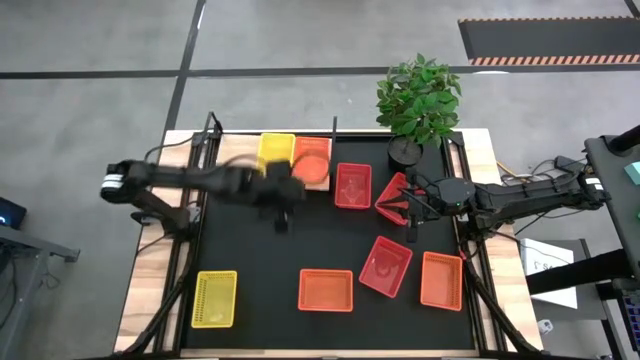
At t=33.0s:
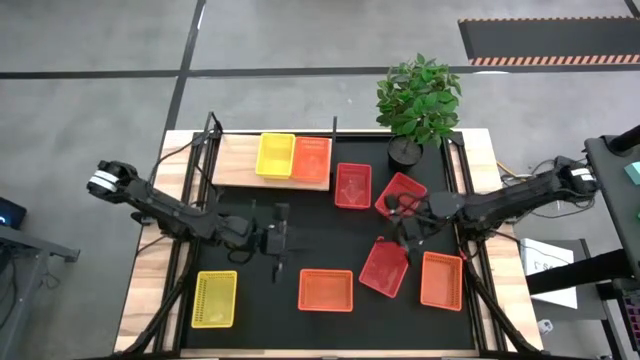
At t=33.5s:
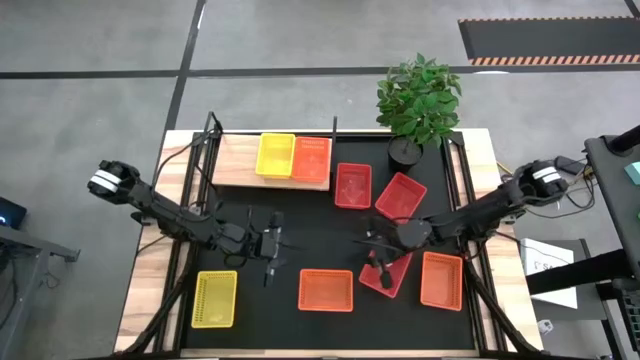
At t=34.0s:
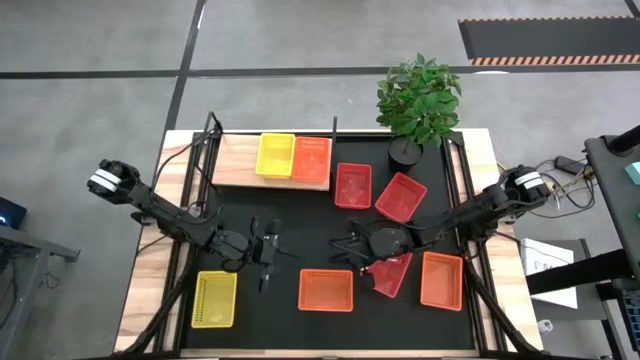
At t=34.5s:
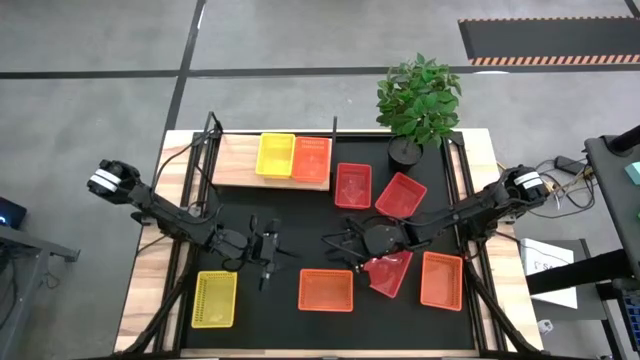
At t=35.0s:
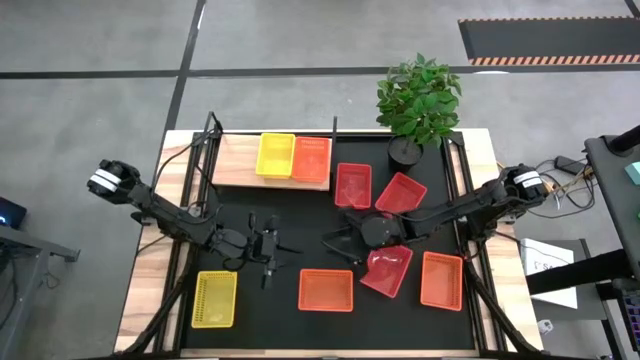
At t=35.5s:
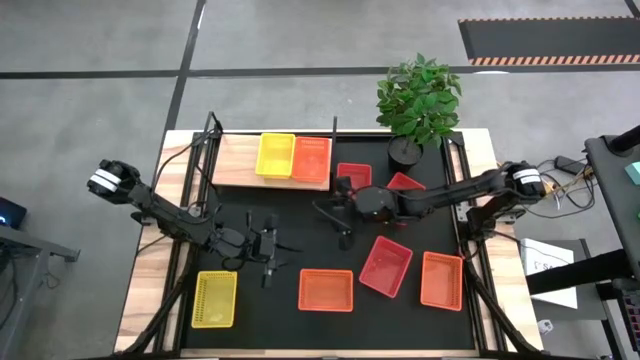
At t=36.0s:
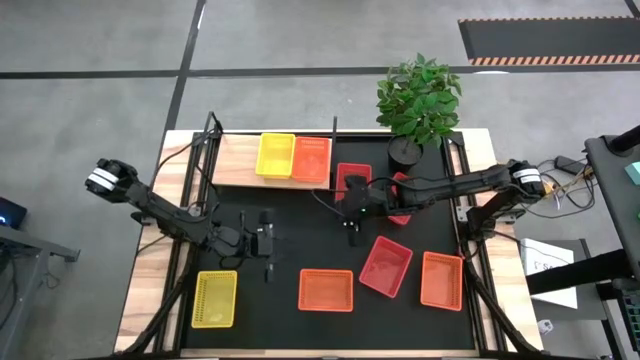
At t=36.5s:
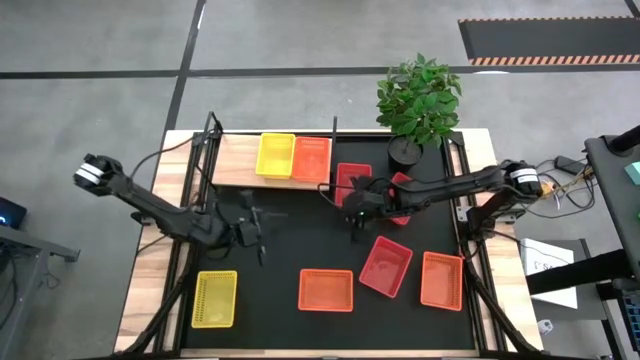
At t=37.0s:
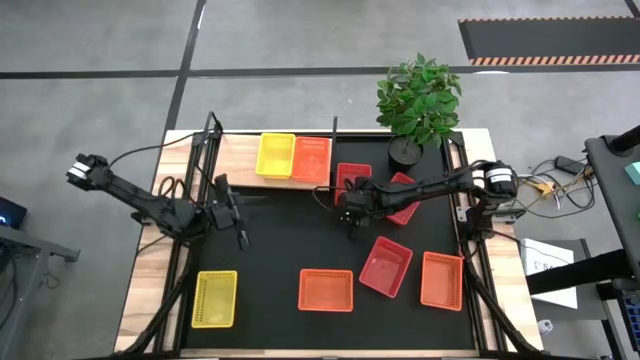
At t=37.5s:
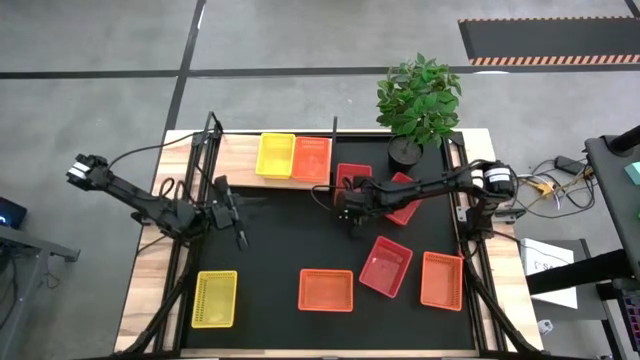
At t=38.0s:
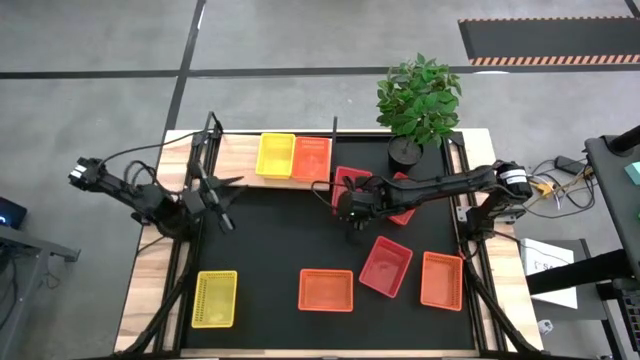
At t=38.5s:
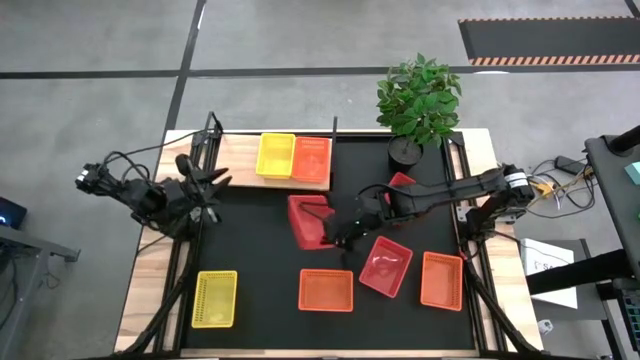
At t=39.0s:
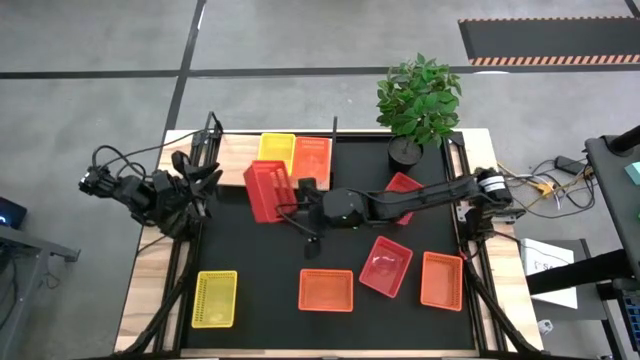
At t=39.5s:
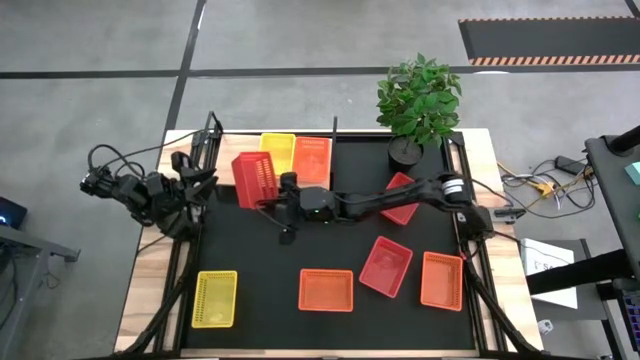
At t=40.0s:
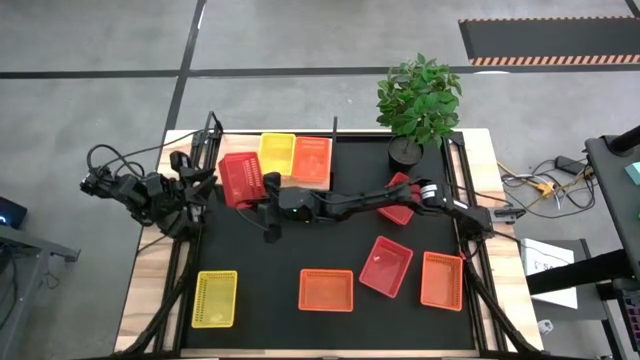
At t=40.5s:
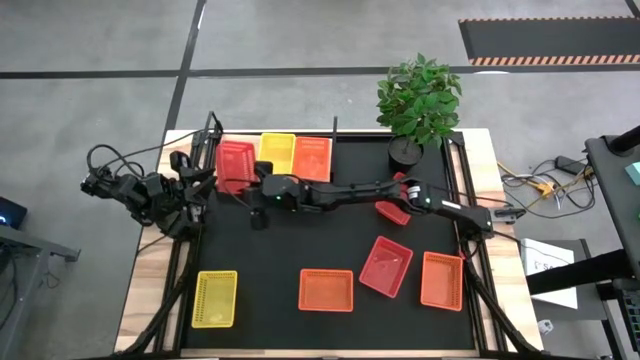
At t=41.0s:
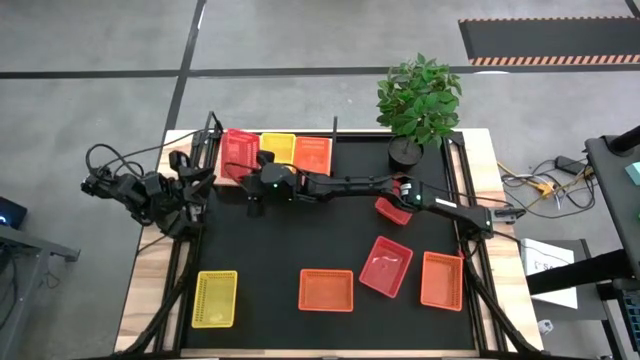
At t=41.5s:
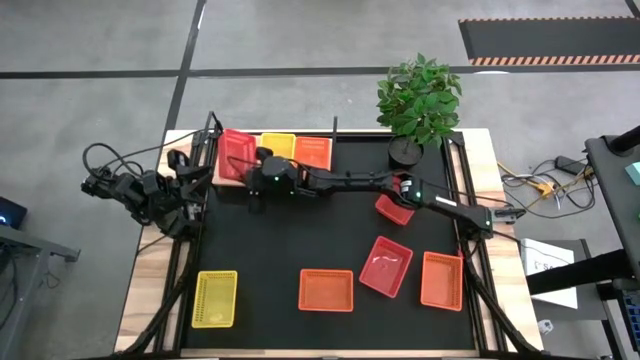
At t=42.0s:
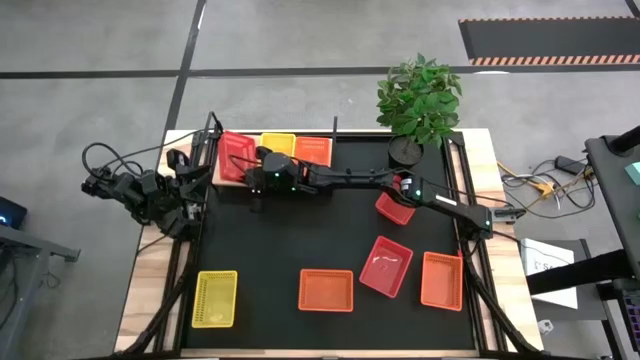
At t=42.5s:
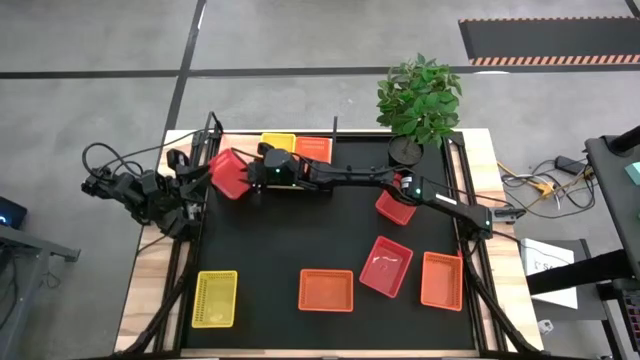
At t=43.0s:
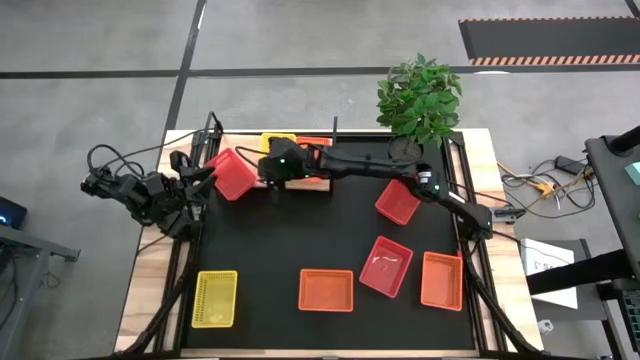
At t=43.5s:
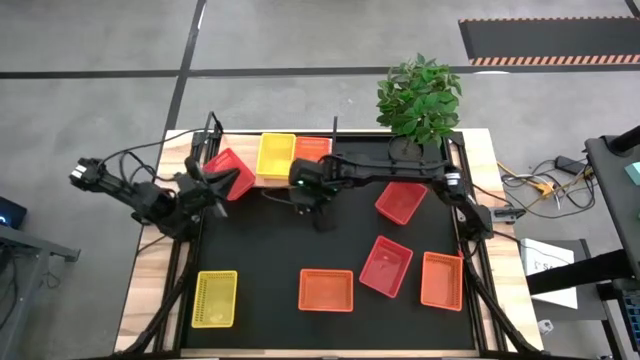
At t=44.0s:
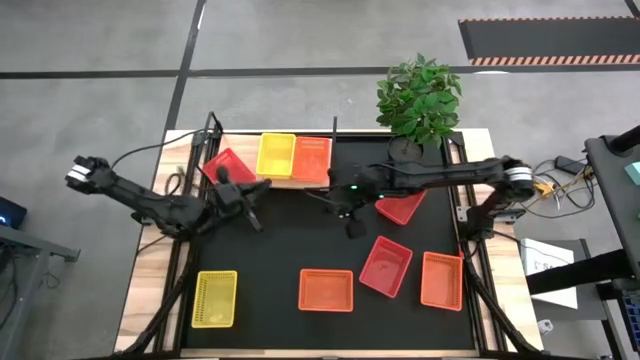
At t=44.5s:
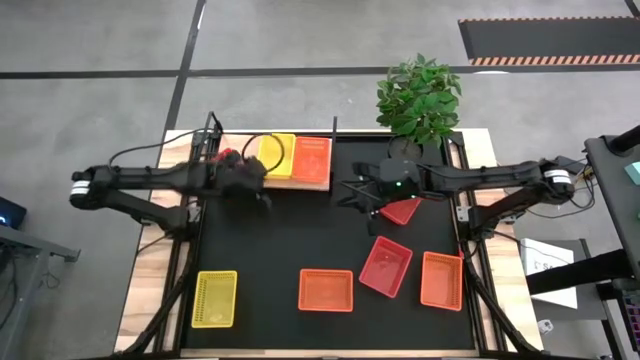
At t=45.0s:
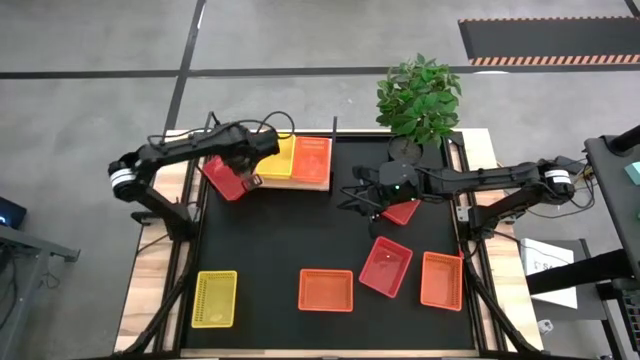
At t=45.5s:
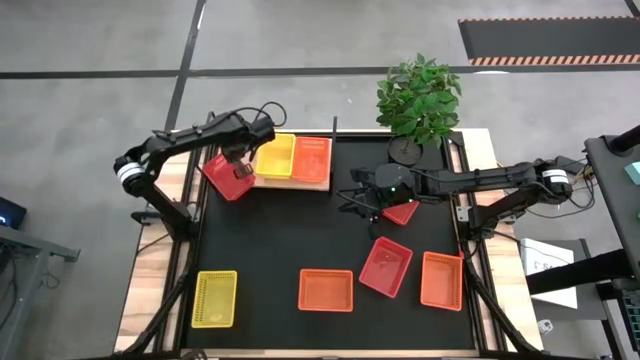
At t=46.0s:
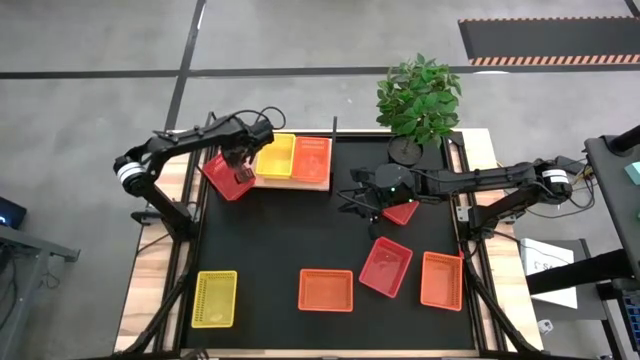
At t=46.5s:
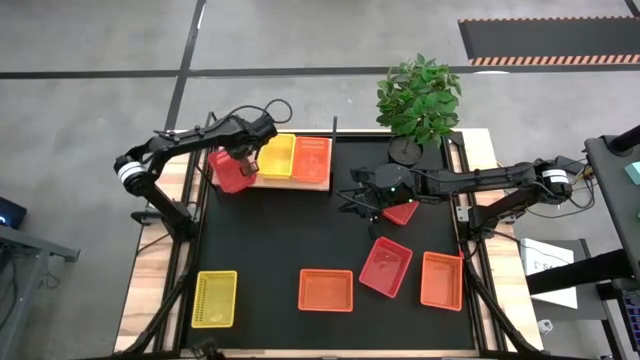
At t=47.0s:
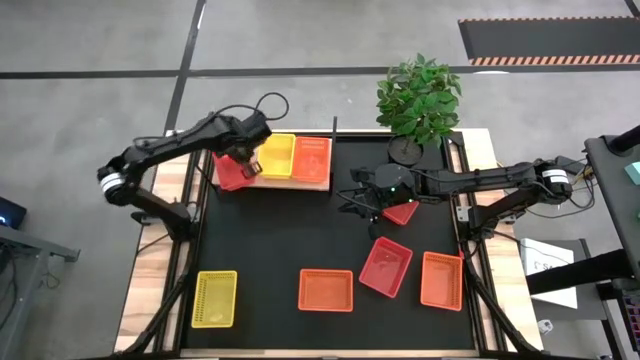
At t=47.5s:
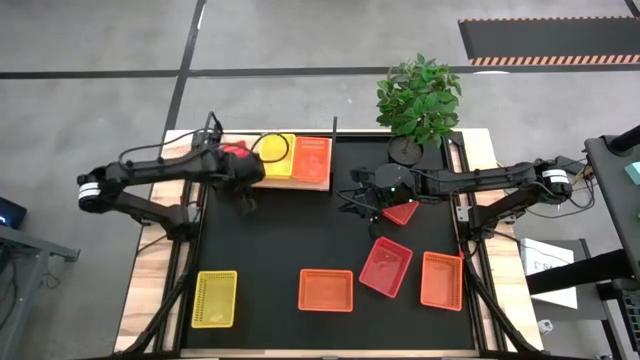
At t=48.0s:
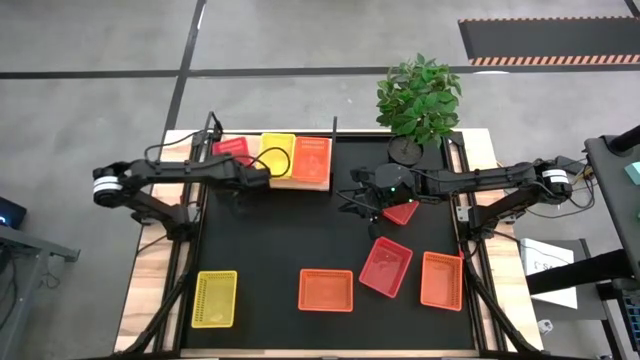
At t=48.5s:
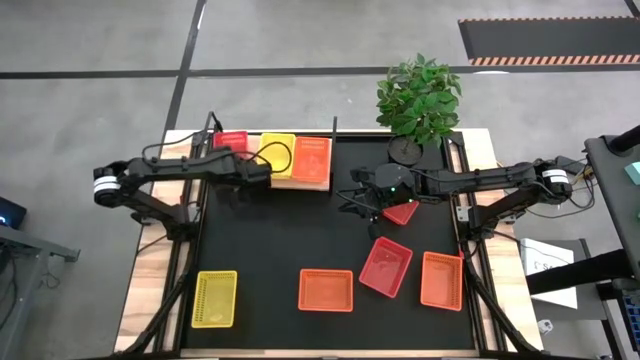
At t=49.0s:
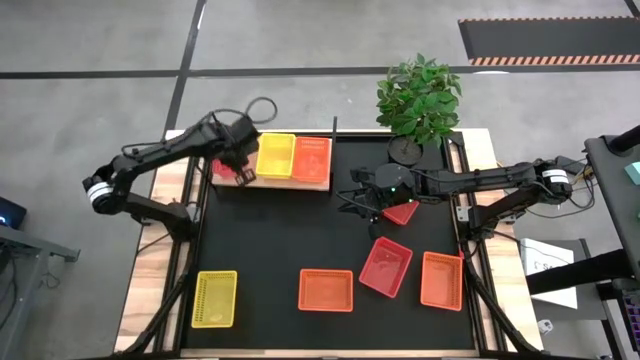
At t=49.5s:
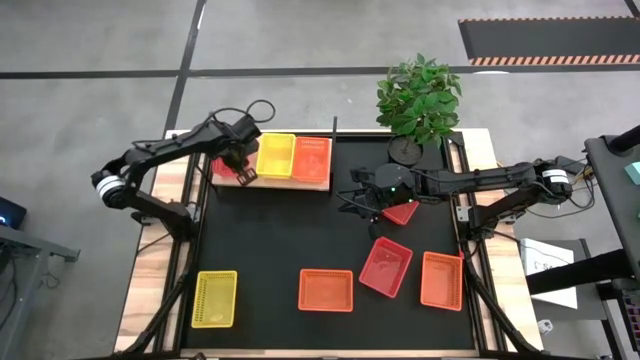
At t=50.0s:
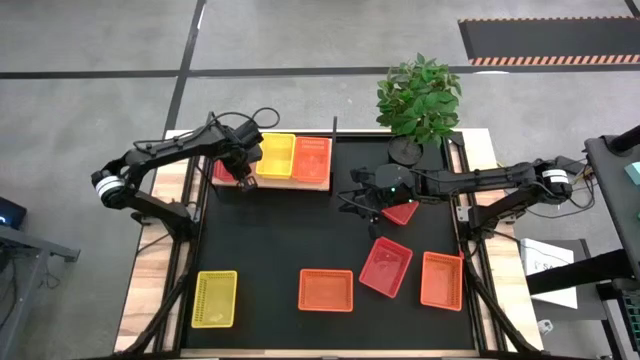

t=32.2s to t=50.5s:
Task: Stack baskets on shelf by color
Put the top left red bin on the shelf

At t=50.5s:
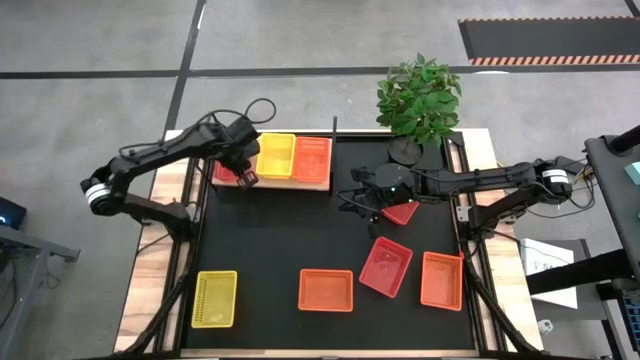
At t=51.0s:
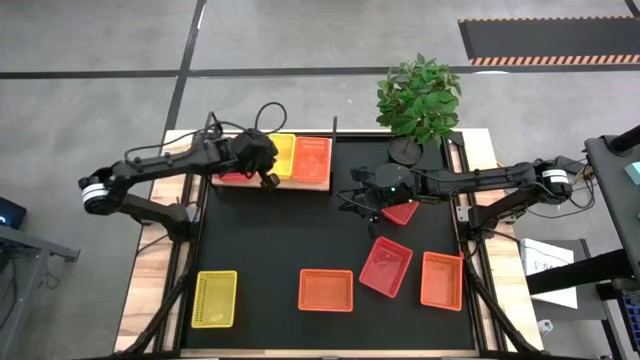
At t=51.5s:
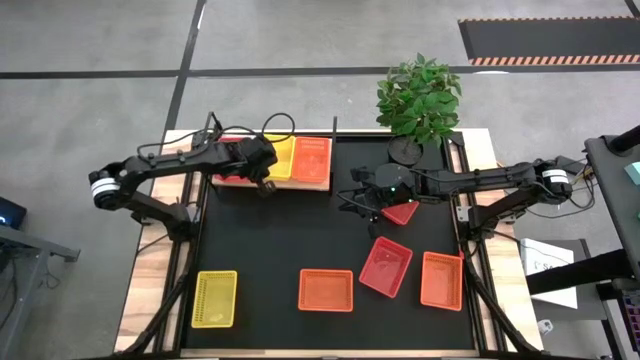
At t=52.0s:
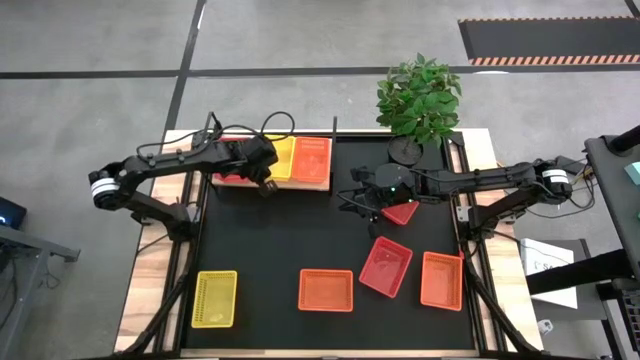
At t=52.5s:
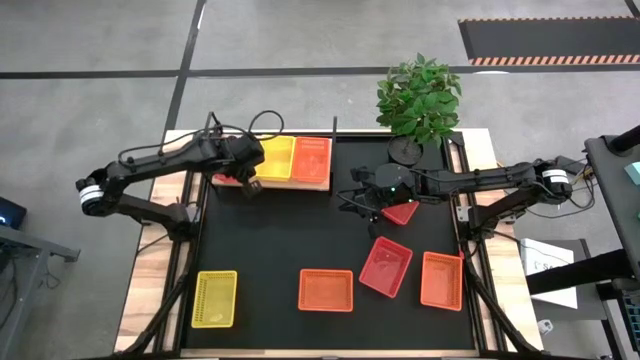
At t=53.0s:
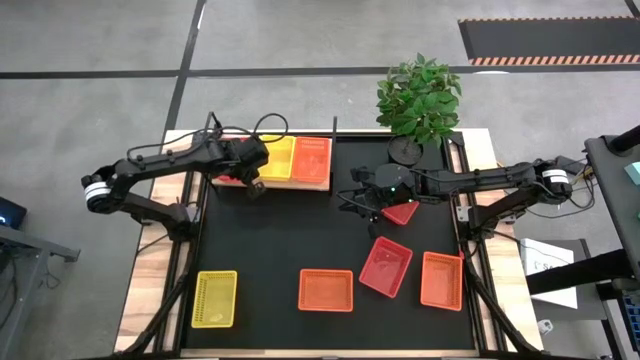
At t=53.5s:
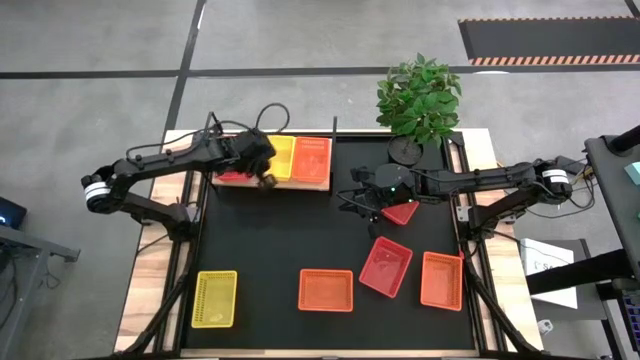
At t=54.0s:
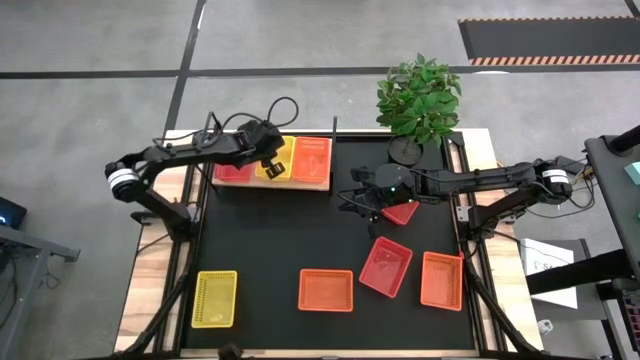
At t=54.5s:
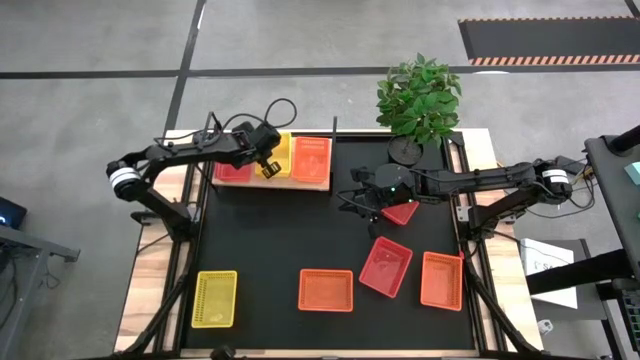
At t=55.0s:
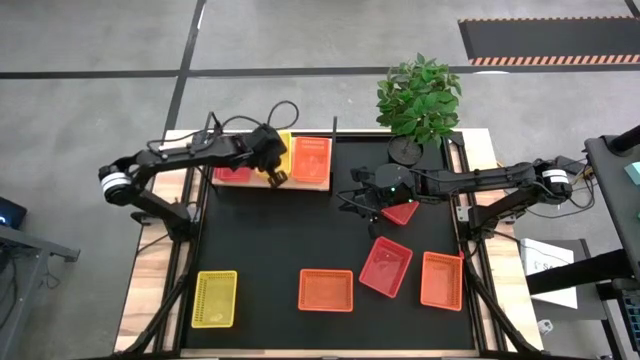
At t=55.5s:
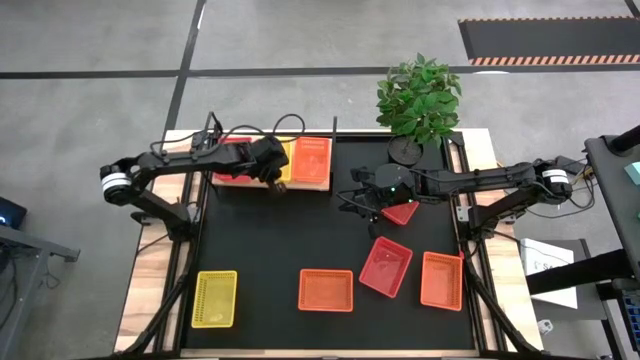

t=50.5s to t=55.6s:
Adjust the yellow bins on the shelf
